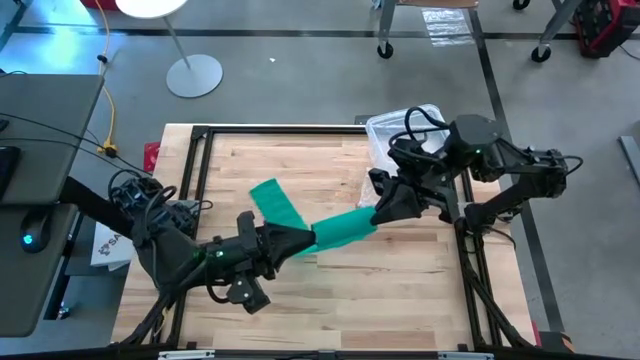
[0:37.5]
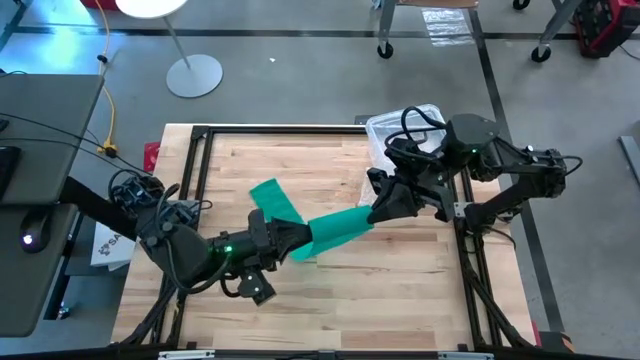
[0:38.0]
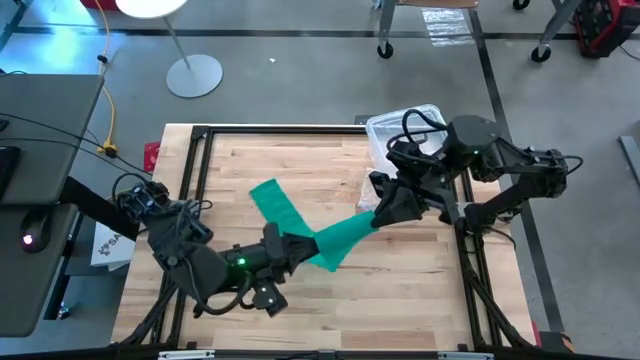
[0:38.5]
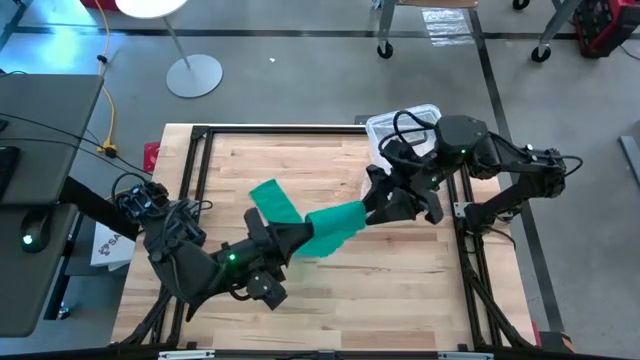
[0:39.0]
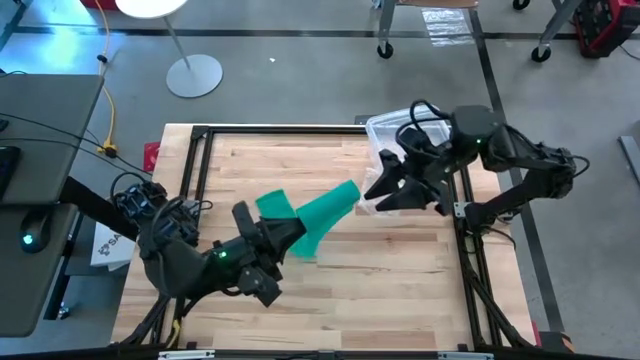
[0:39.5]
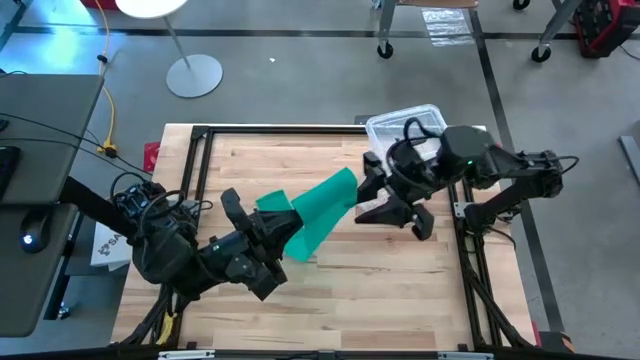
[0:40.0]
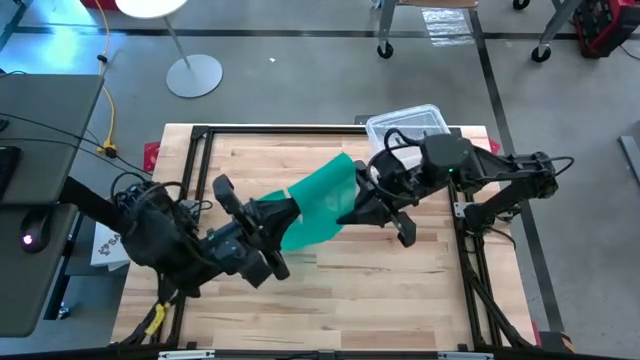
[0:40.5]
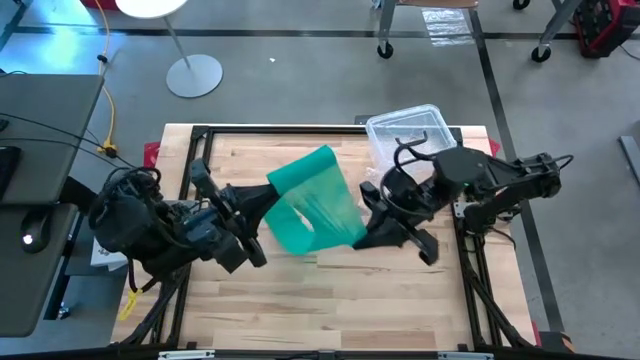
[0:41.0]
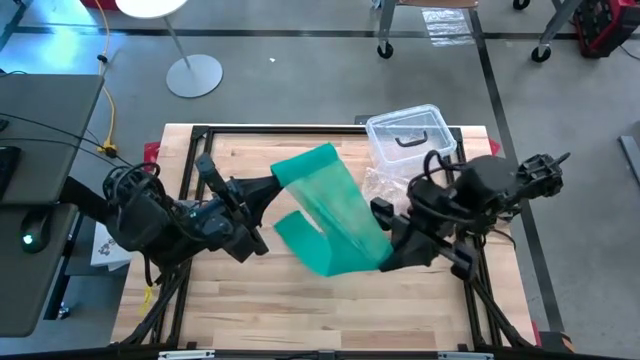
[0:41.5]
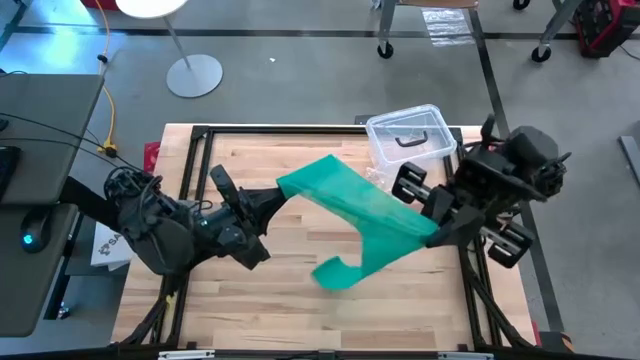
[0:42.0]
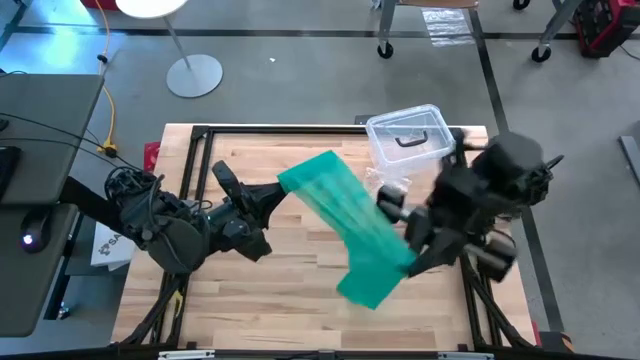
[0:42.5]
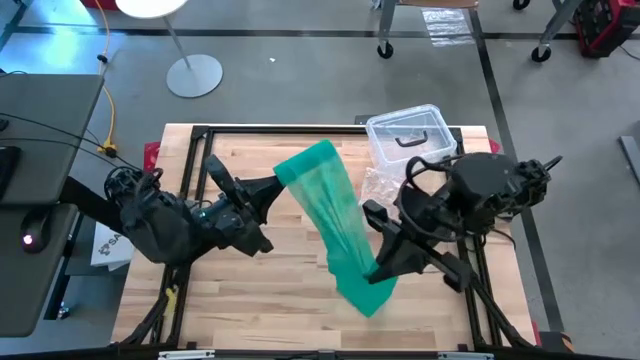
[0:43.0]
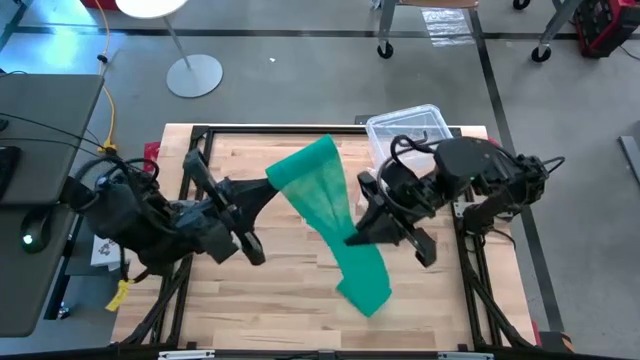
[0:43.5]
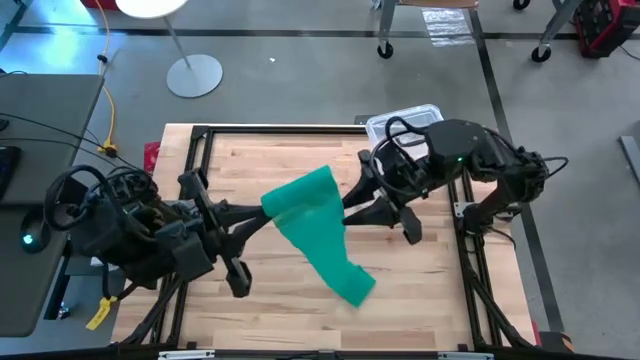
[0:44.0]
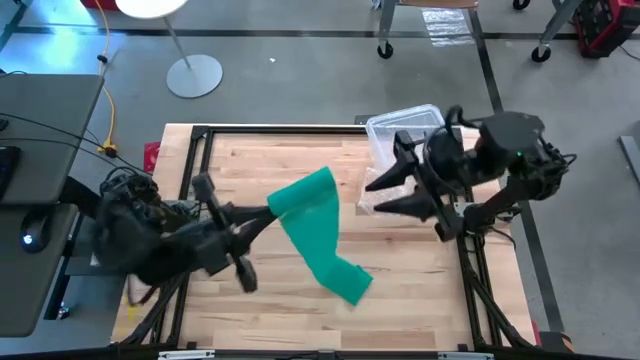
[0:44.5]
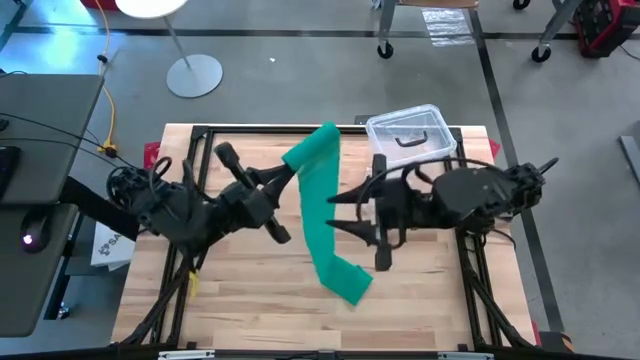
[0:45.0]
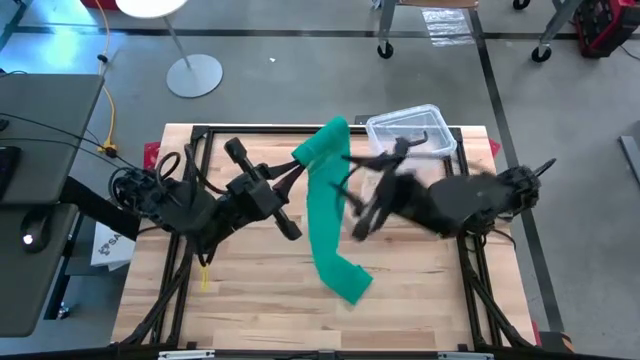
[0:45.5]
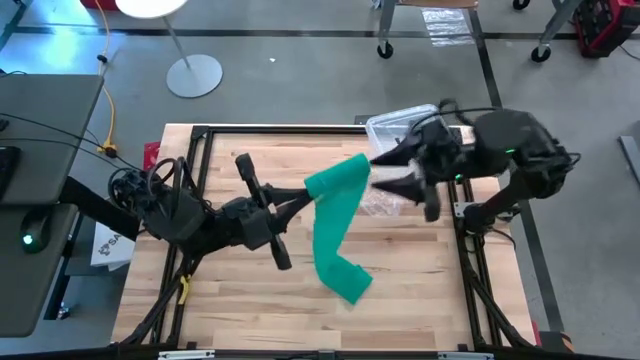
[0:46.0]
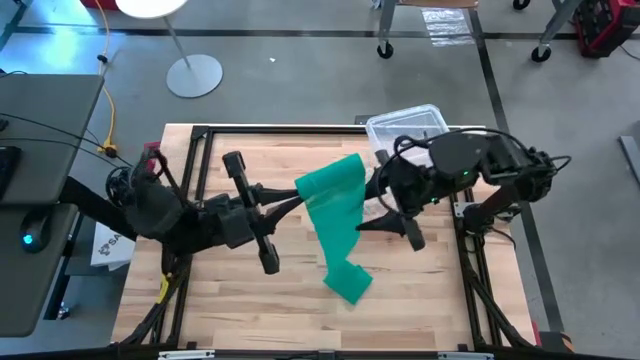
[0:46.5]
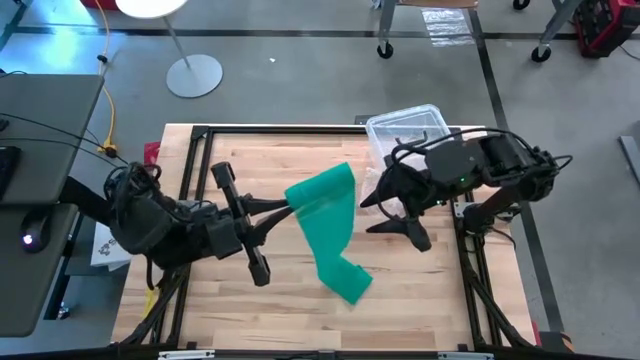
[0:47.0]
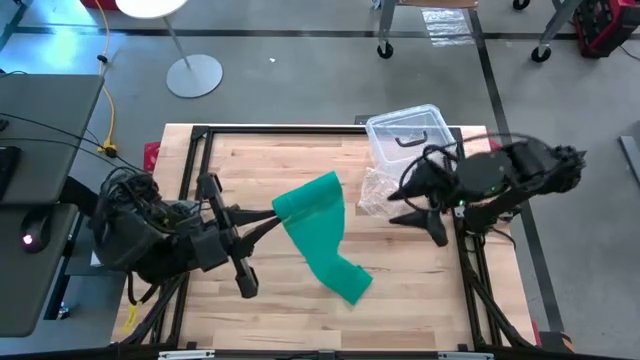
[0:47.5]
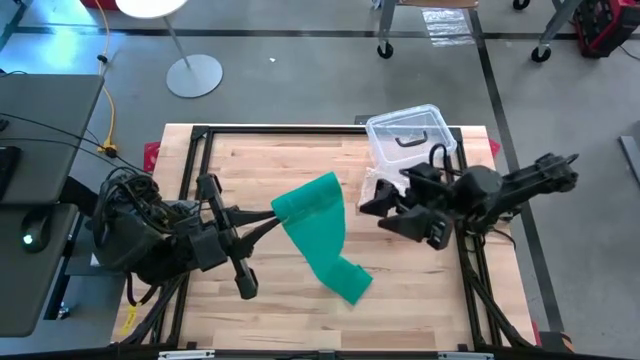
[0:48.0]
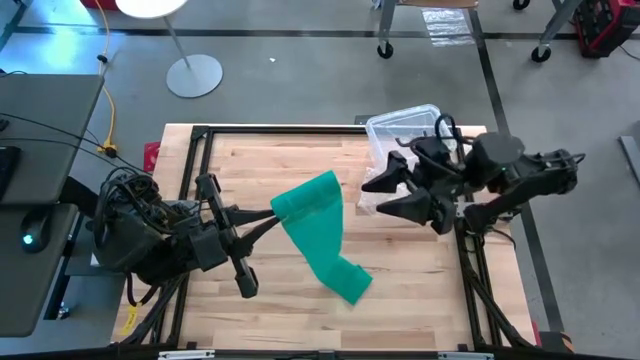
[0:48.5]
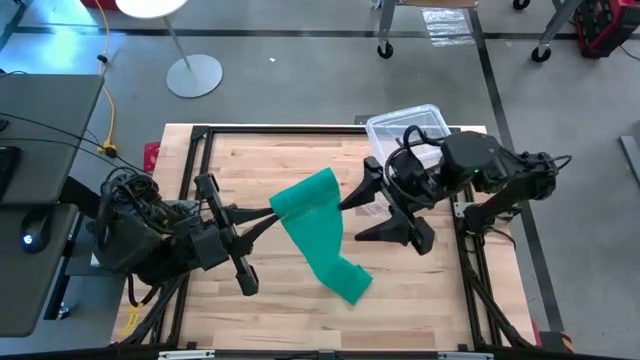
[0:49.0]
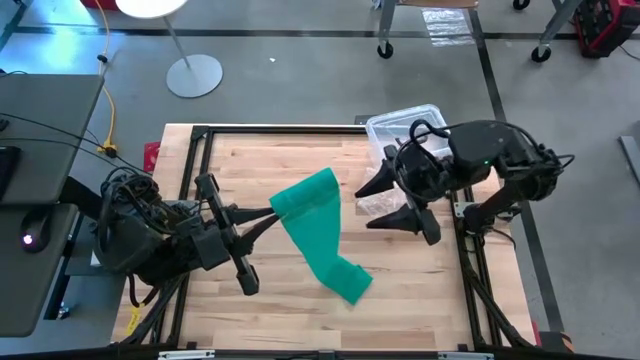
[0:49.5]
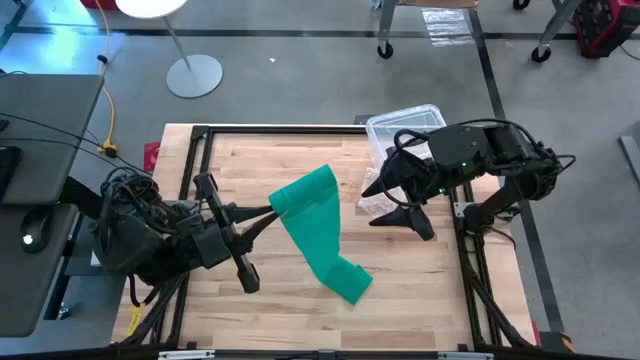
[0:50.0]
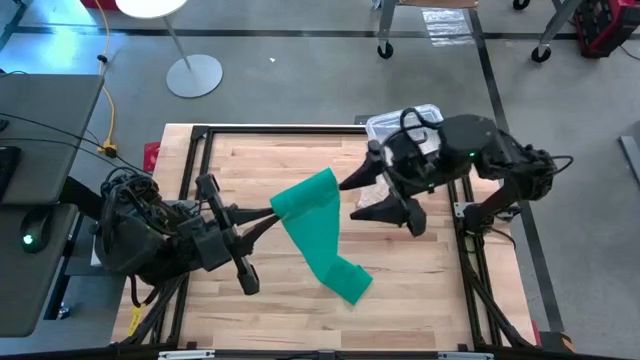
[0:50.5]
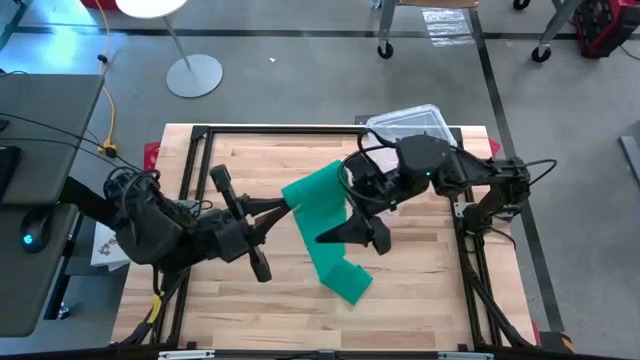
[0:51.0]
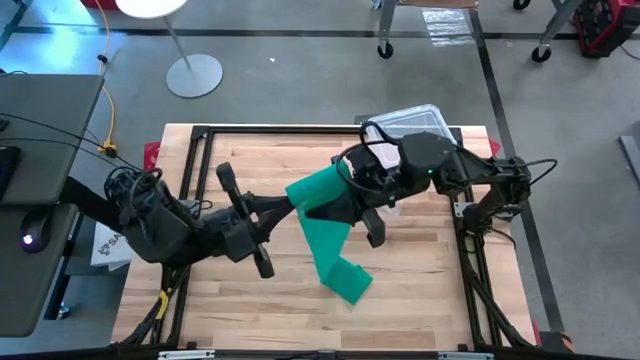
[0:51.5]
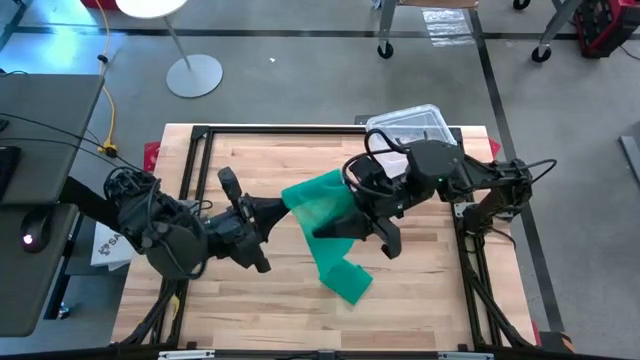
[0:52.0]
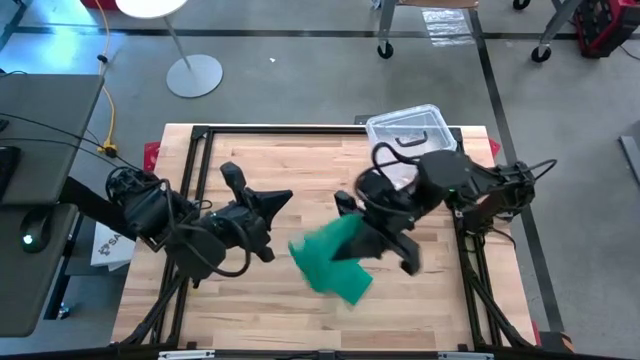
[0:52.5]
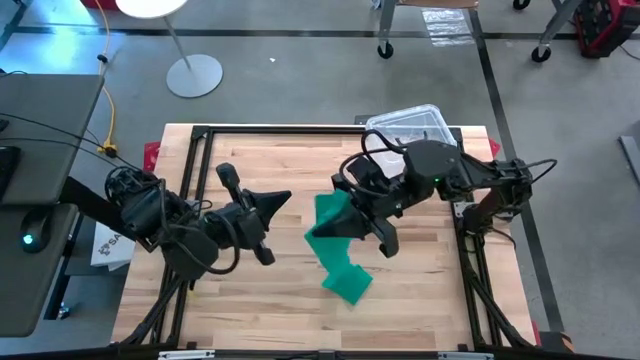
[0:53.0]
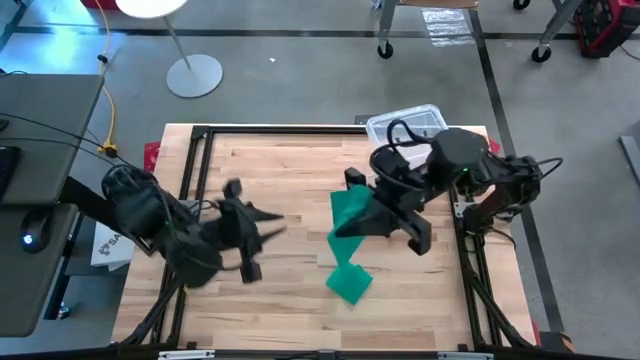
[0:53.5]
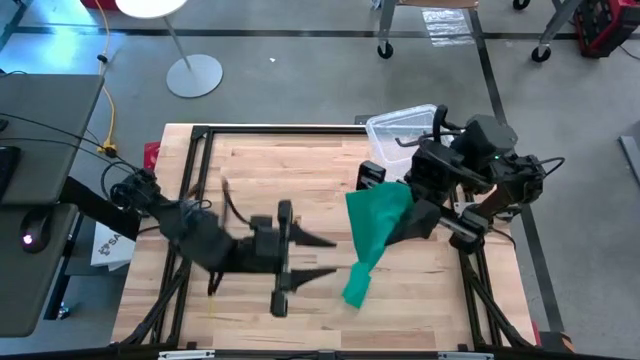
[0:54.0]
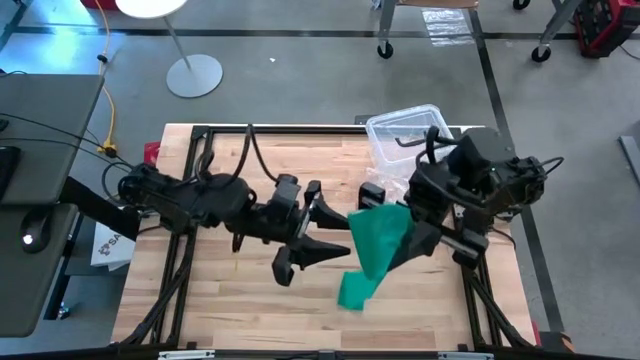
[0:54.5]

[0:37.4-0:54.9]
Task: Roll bandage
Roll the green bandage

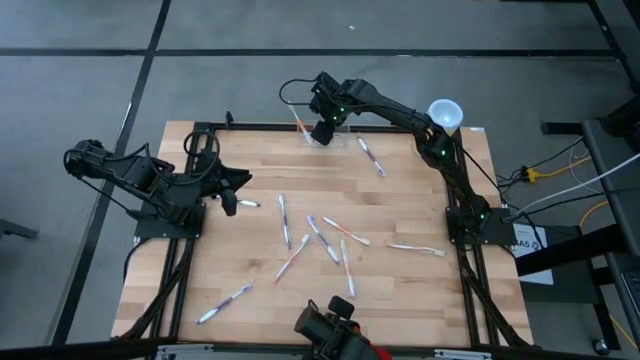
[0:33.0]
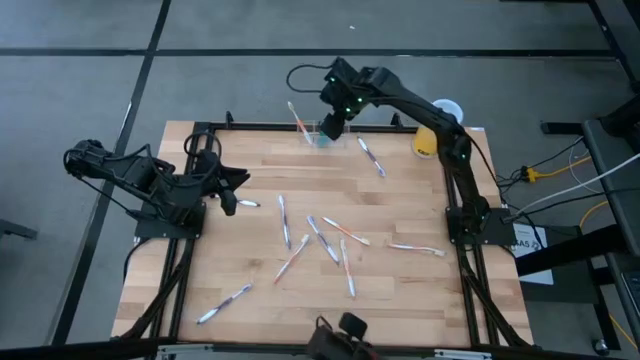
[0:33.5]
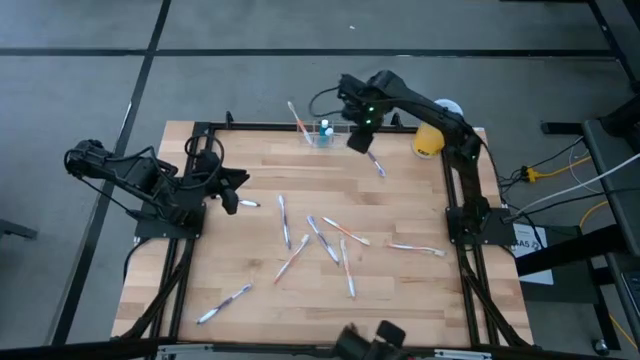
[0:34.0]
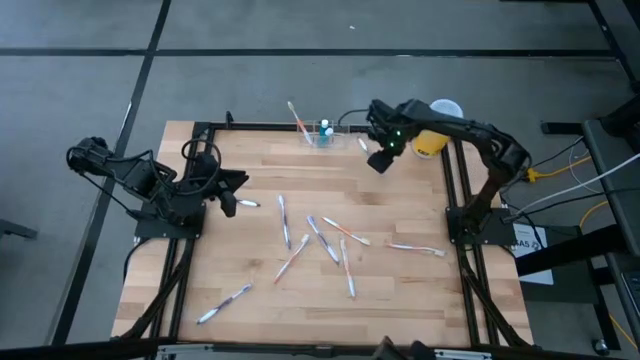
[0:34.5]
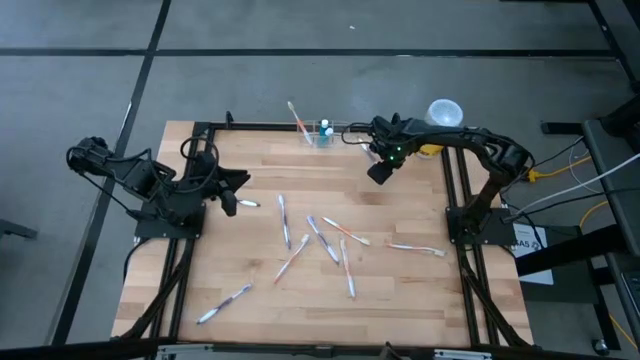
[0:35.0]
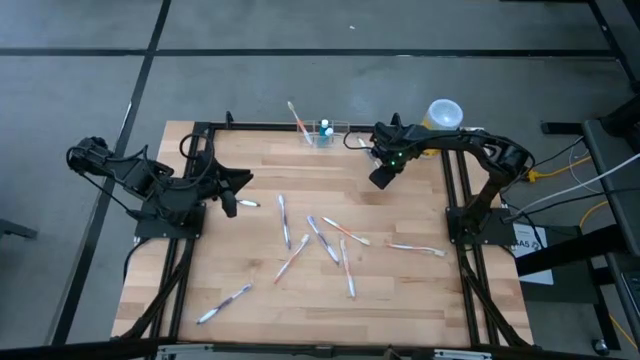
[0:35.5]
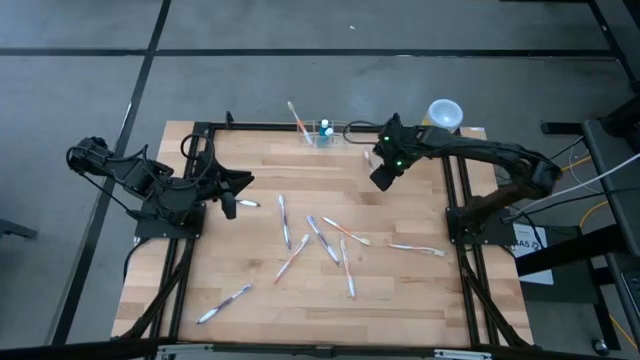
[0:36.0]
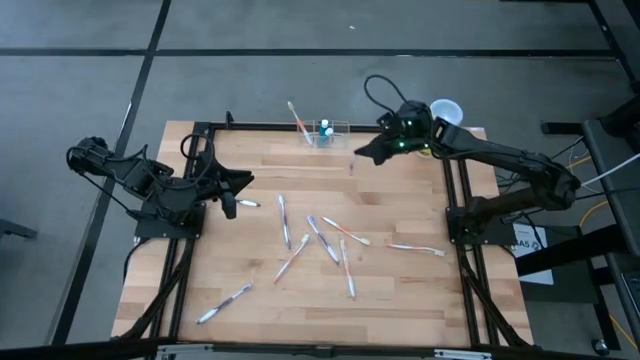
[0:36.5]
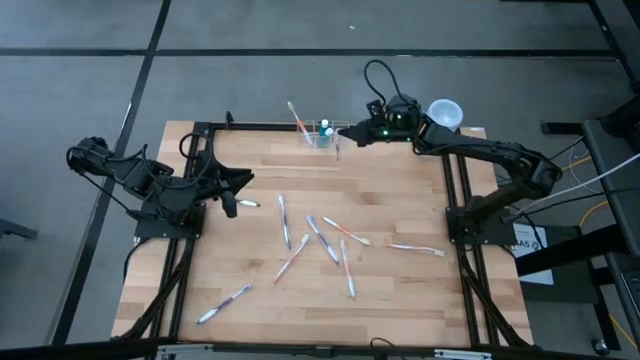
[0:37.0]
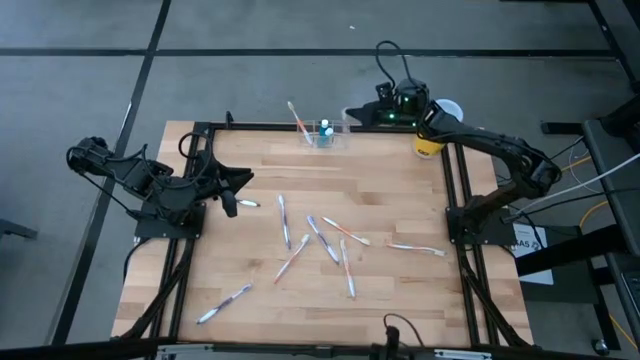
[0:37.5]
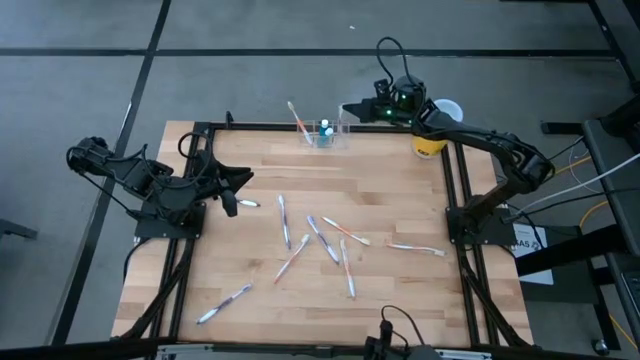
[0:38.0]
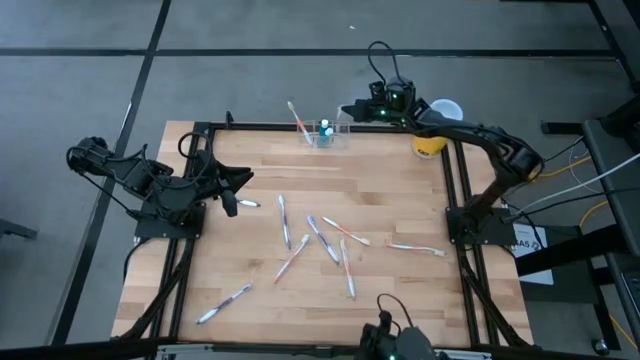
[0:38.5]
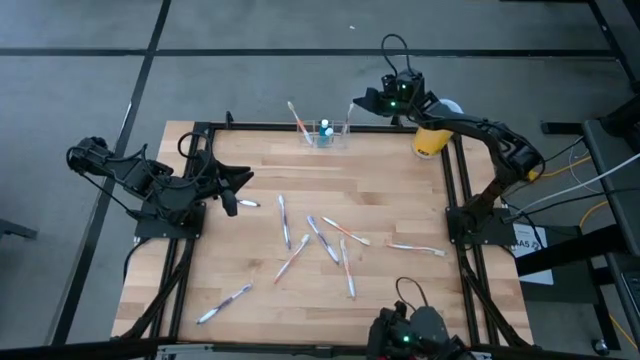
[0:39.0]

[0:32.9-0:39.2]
Task: Pick & Place toothbrushing station
Put the purple toothbrush into the transparent organizer
